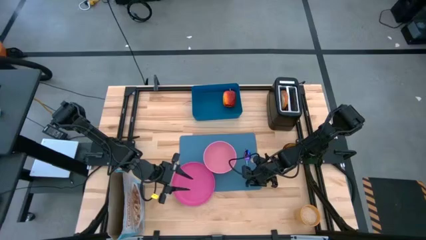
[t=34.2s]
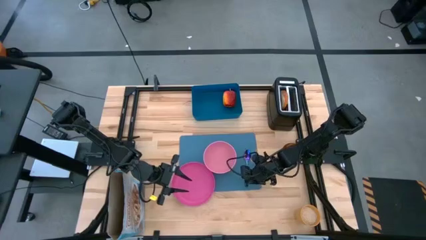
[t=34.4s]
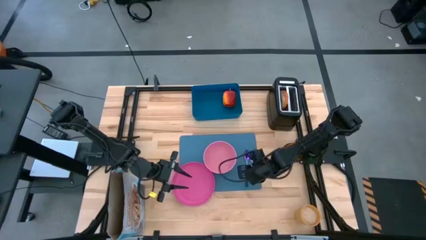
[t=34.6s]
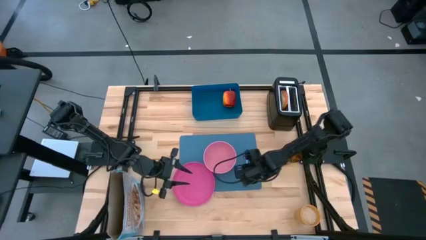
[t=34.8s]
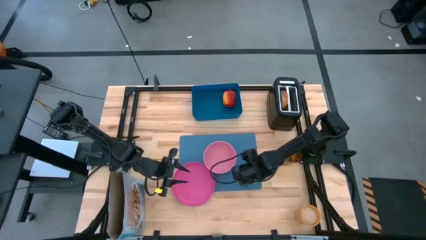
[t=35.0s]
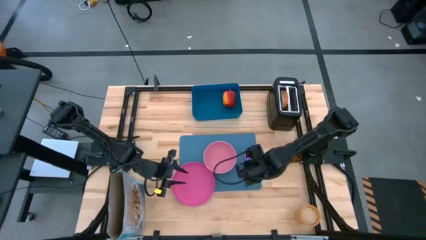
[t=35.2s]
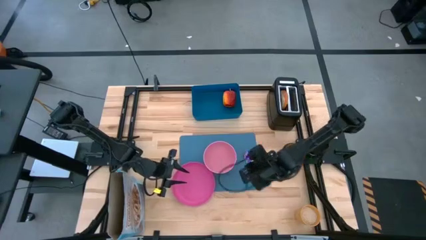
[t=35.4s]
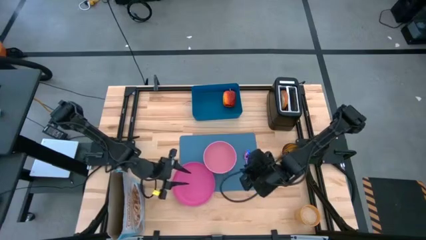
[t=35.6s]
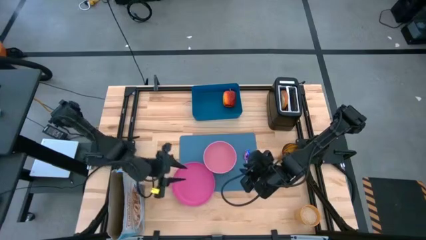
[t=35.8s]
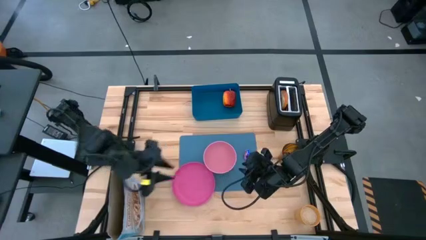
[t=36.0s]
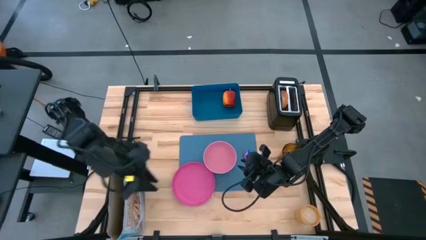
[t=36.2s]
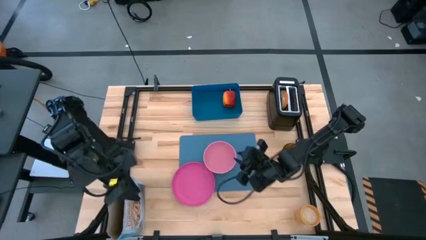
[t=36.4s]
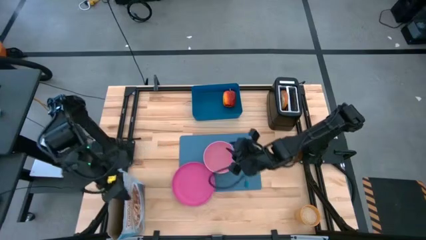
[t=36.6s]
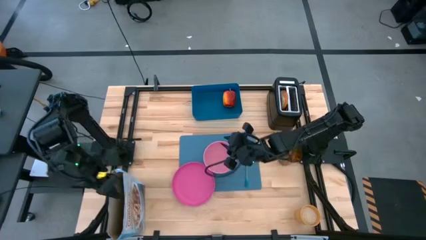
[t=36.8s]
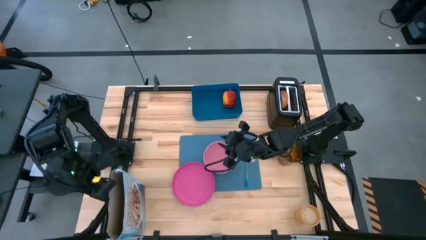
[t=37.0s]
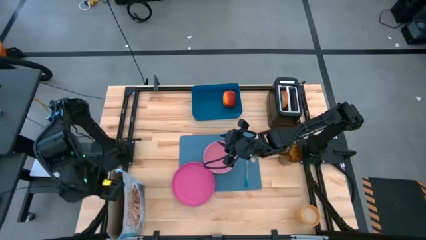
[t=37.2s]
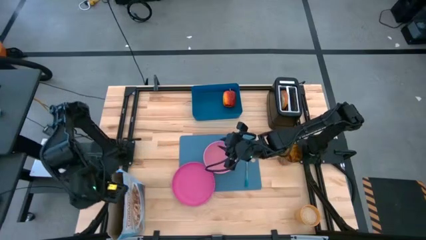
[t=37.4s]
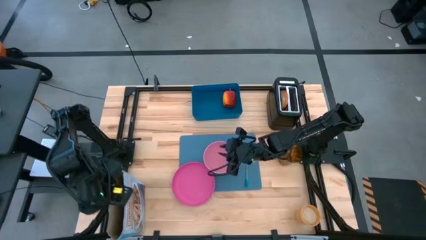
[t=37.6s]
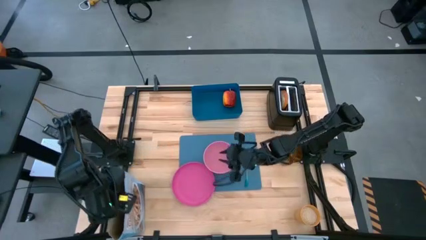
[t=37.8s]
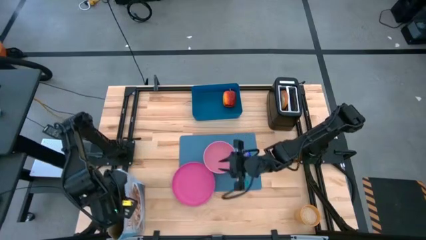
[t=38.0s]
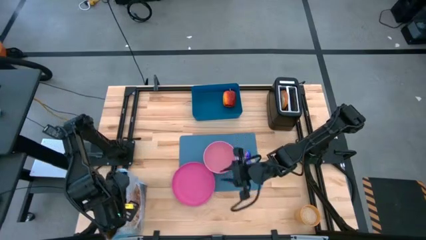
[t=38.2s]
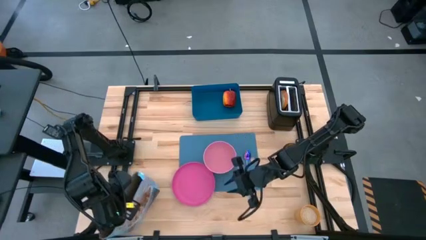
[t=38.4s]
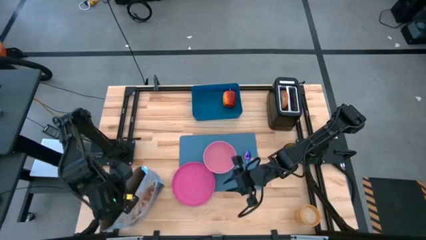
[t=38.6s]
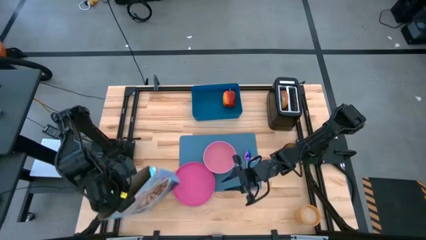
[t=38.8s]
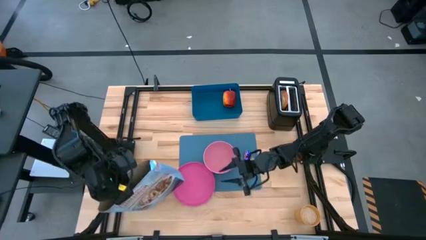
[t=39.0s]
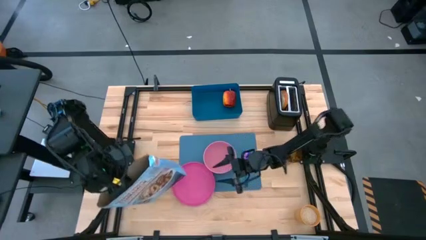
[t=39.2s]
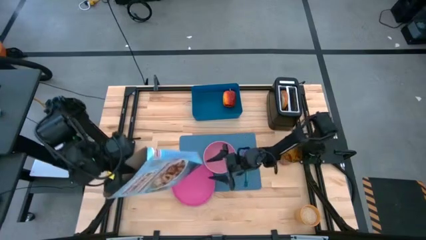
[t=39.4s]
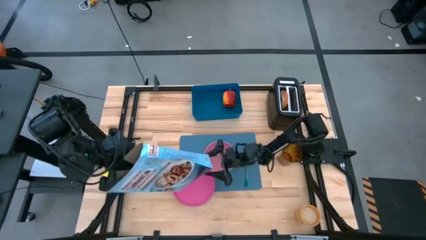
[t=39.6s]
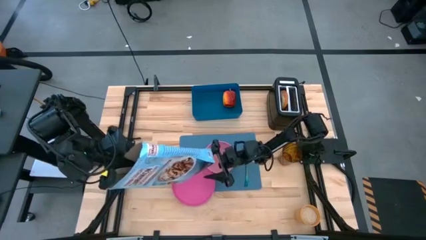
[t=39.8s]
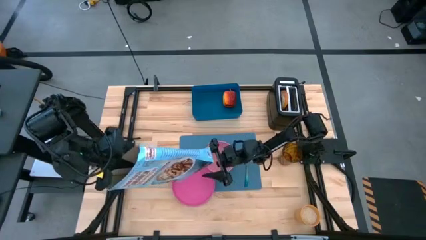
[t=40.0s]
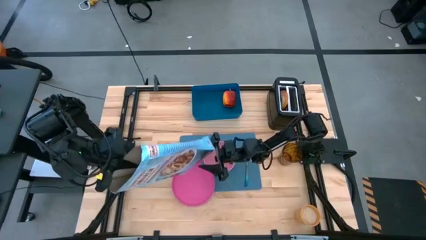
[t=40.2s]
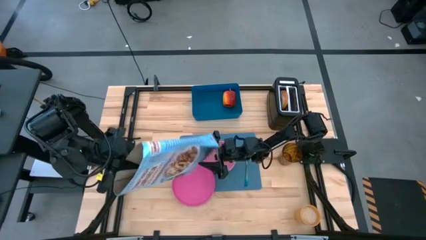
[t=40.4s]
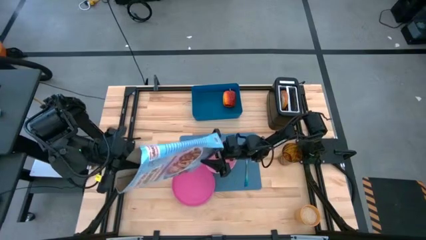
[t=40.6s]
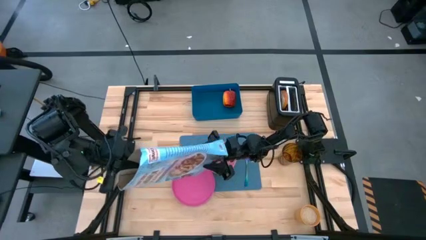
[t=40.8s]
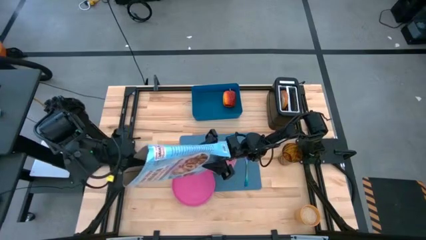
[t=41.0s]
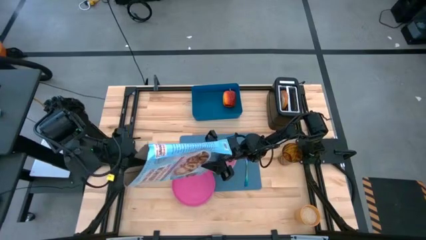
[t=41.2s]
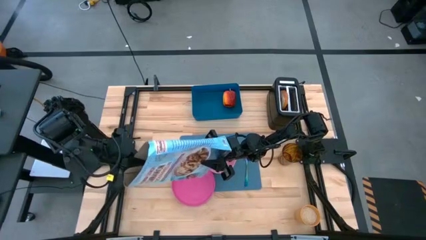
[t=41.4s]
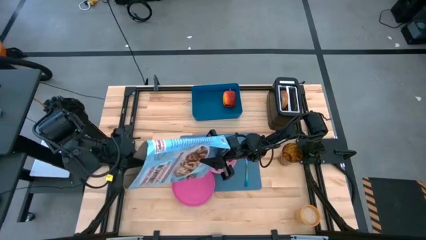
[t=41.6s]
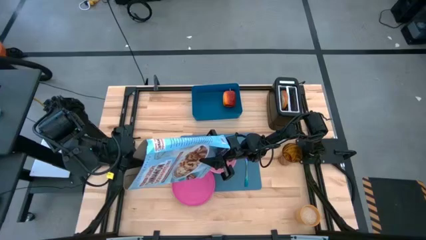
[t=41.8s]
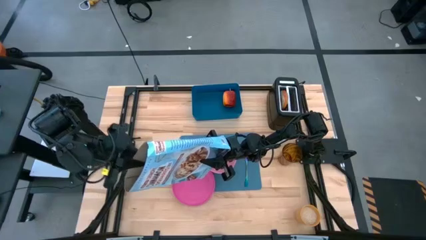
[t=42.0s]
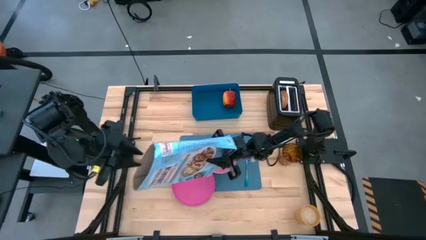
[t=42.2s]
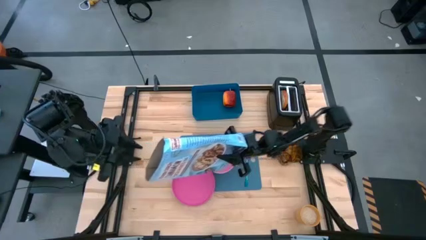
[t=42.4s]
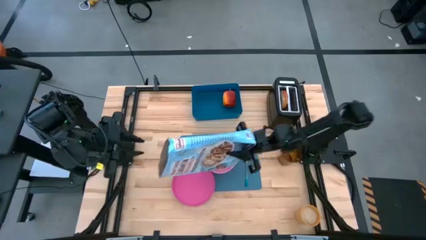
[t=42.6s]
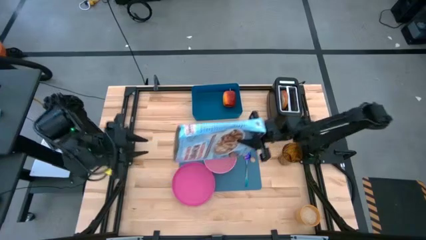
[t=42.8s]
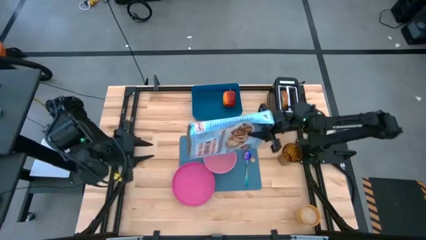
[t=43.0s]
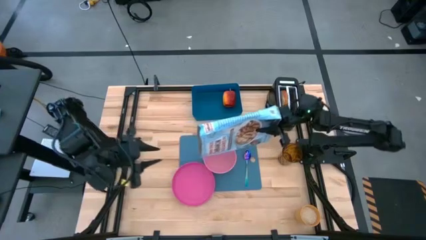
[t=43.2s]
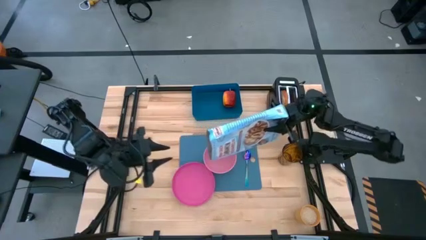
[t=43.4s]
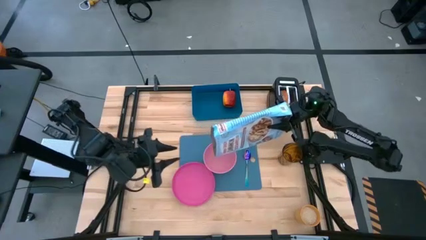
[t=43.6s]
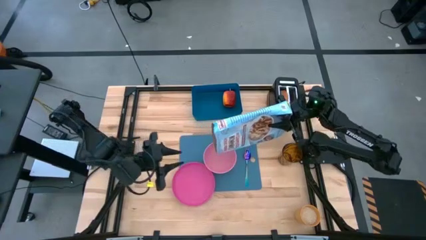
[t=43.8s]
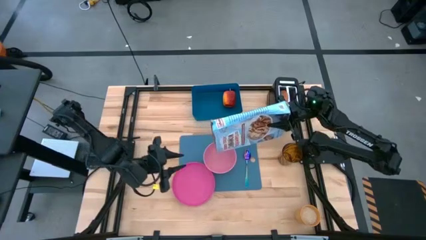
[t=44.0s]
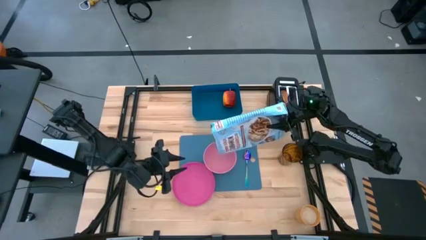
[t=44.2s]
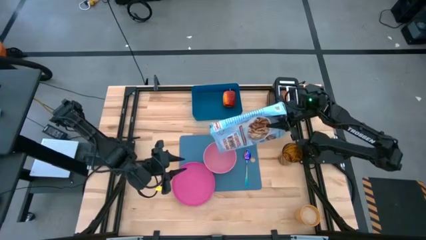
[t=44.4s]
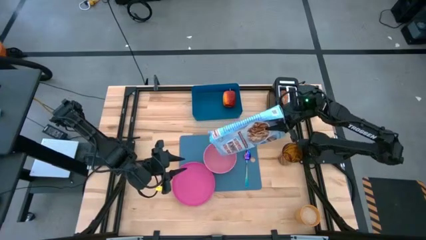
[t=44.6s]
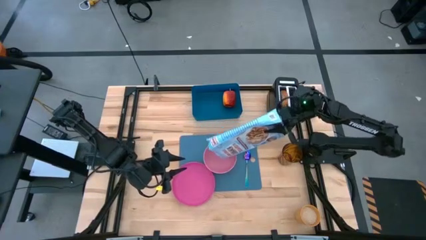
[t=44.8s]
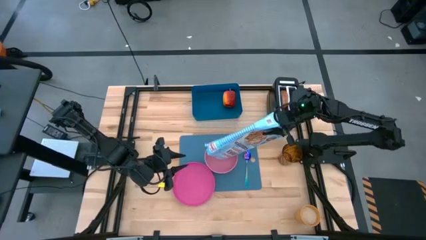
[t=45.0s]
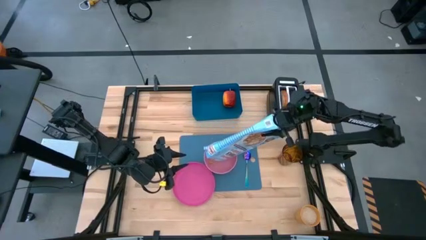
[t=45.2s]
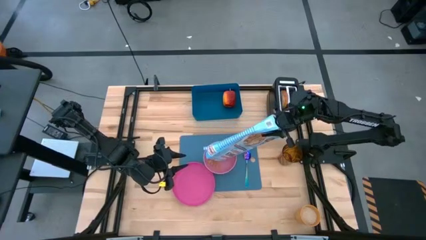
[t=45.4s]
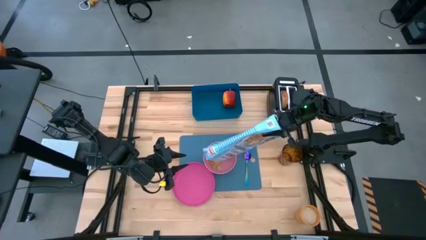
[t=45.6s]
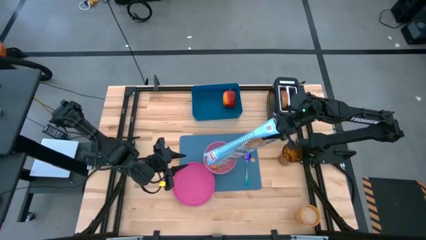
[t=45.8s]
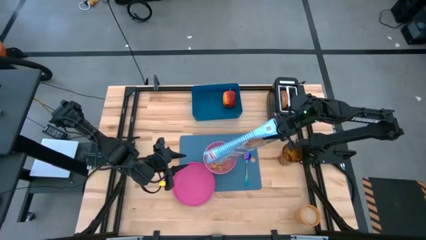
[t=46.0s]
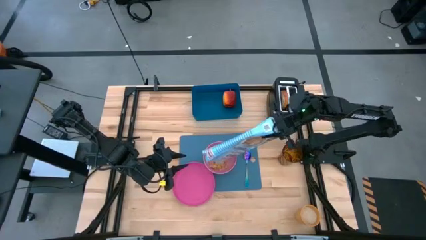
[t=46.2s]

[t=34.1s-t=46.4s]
Task: Arrange a breakfast setting
Pour the cereal from the blue cereal box into the pink bowl

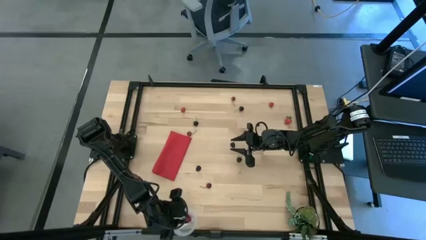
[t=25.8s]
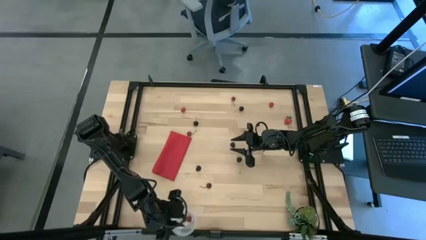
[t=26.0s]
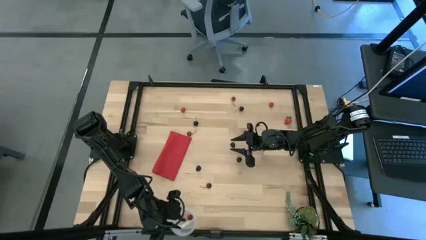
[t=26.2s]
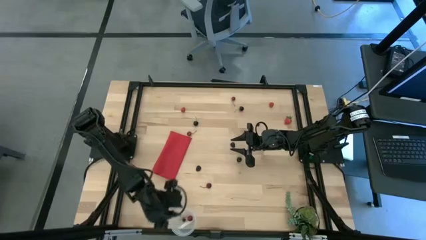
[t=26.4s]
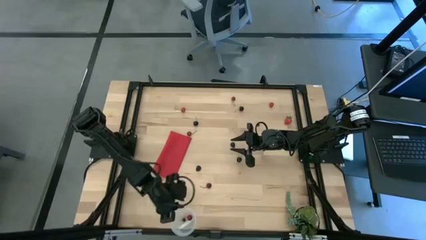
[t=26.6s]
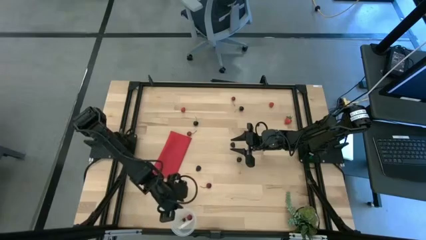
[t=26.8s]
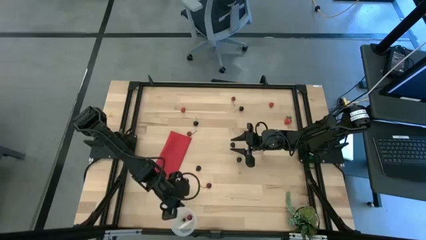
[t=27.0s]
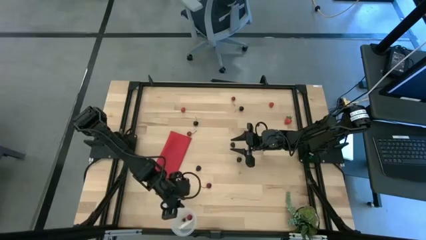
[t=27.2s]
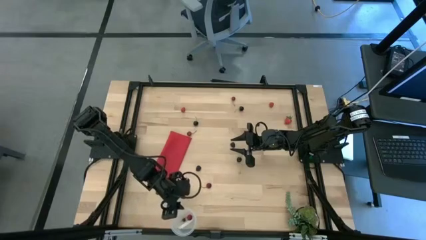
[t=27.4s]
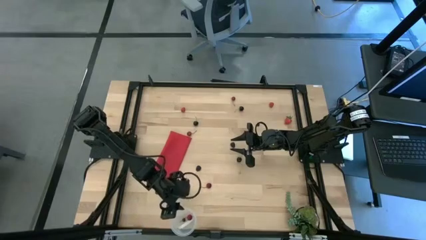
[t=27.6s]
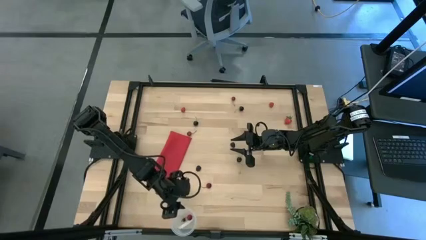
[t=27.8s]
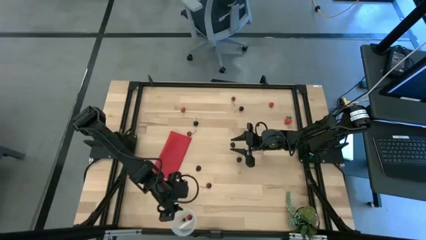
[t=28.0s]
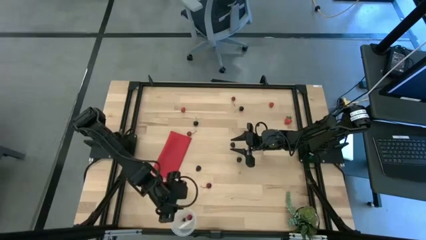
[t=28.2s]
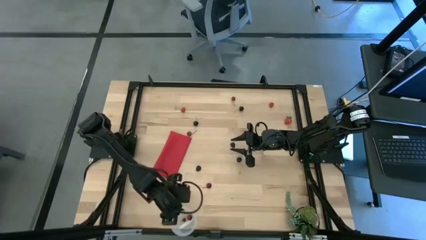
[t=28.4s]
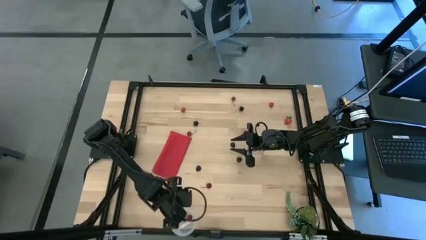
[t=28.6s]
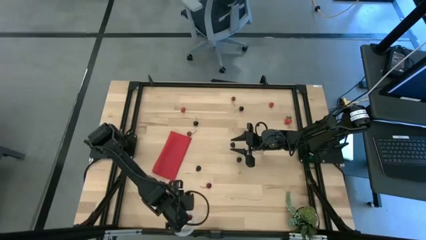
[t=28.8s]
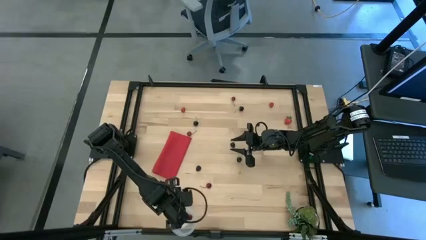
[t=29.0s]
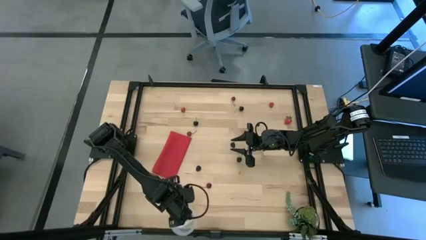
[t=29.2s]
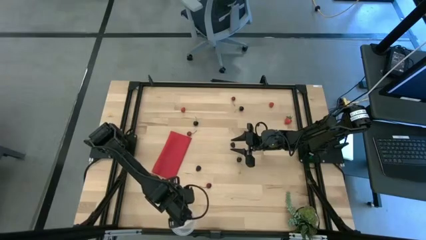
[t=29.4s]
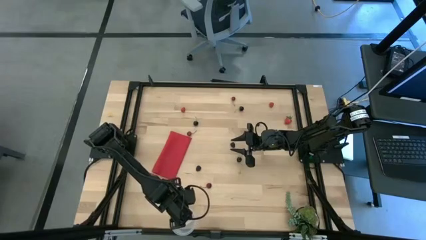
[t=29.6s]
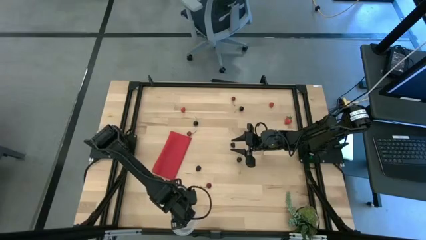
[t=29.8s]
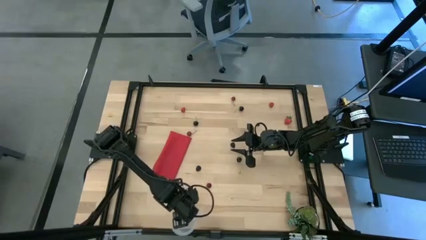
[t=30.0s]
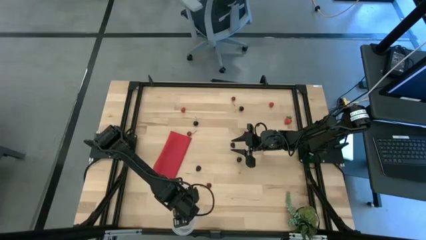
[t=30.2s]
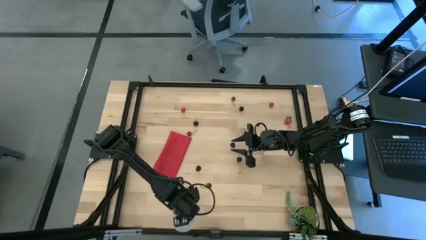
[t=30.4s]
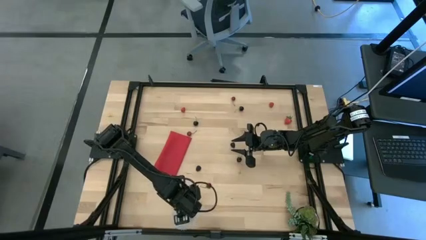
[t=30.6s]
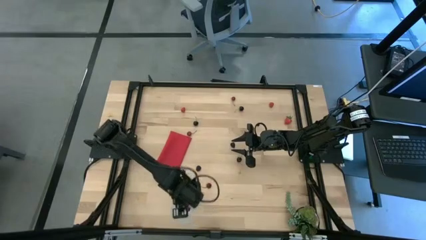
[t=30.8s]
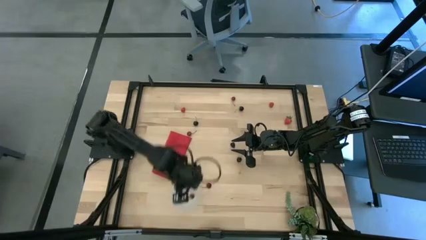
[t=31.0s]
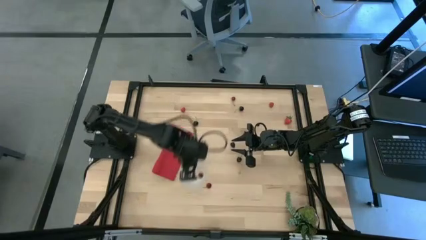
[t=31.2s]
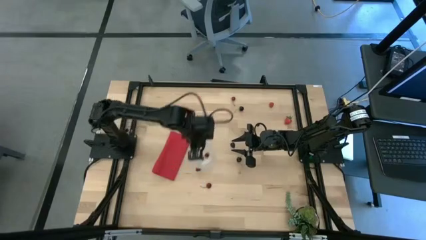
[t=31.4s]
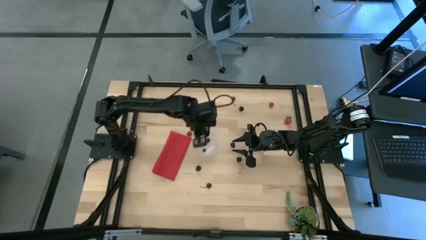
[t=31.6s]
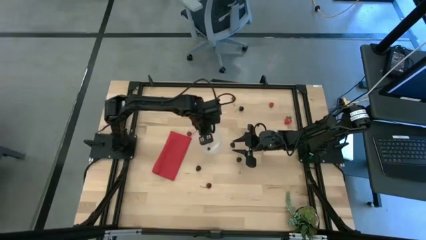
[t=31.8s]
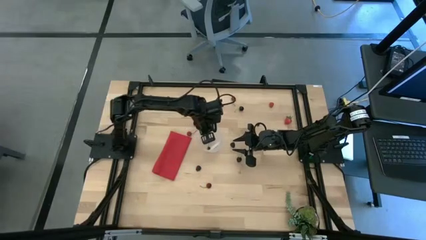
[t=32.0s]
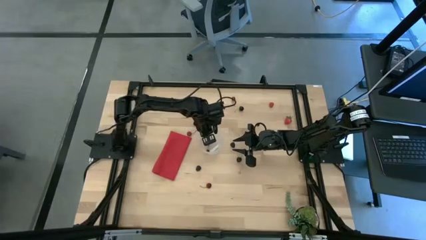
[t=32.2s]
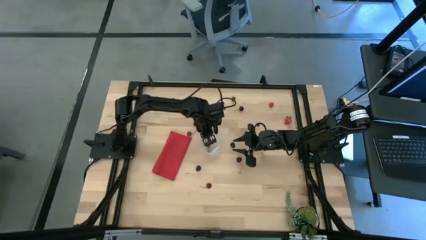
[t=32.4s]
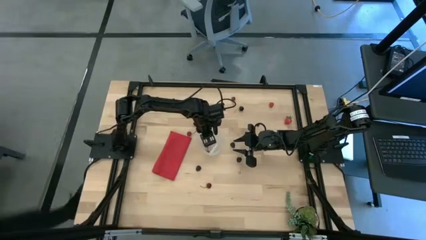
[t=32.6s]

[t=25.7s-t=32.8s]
Task: Pick and placing Produce into tupperware
Move the transparent bin from the bottom left of the table to the center of the table
